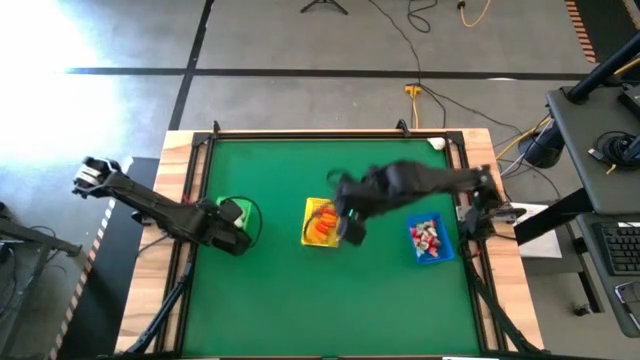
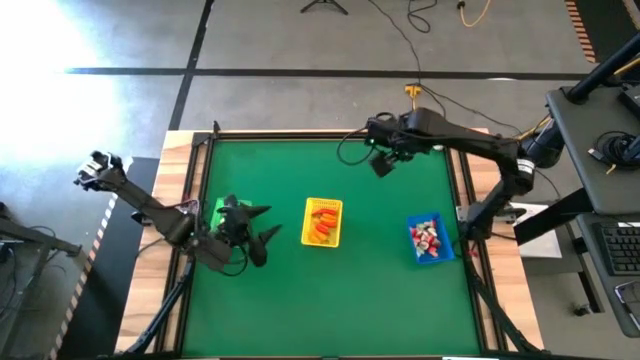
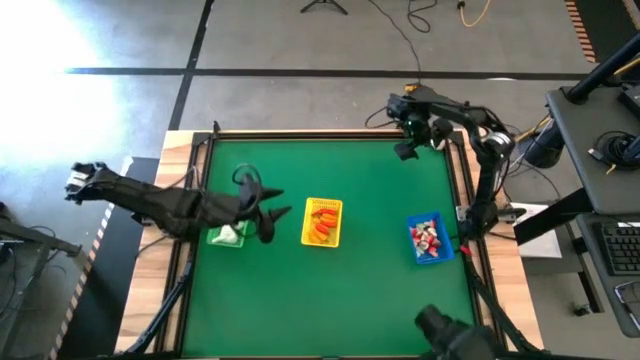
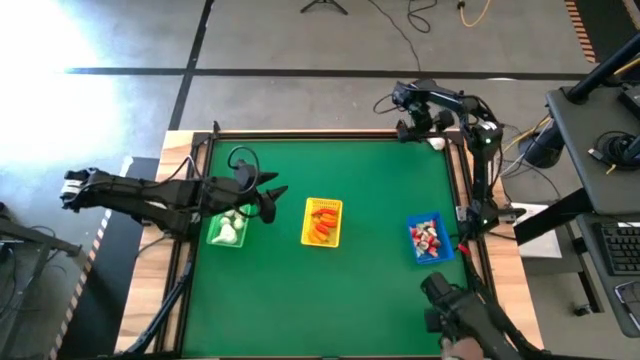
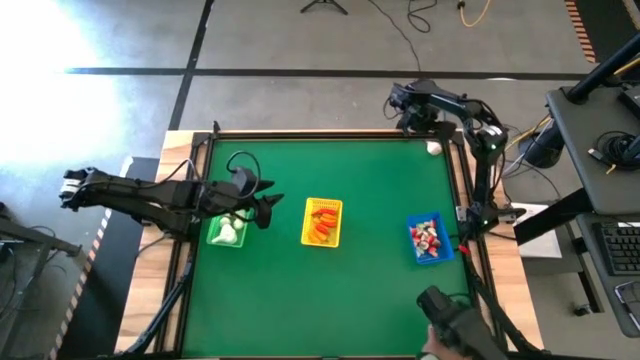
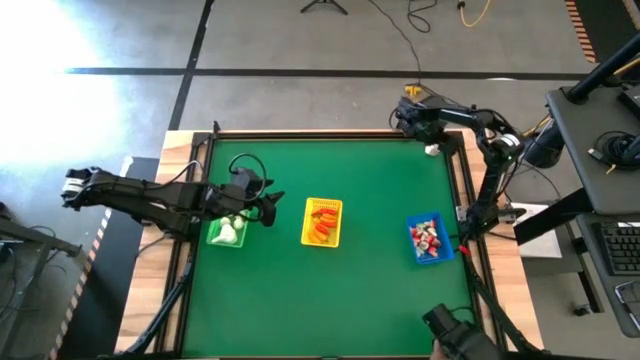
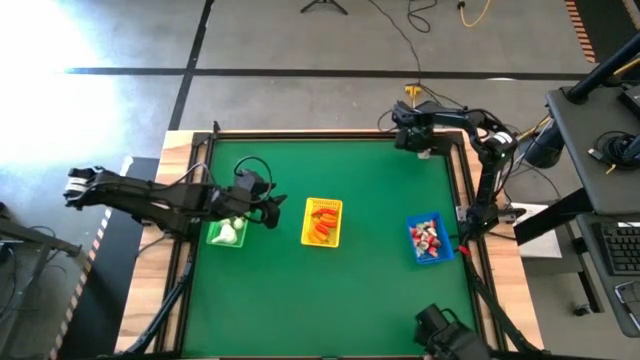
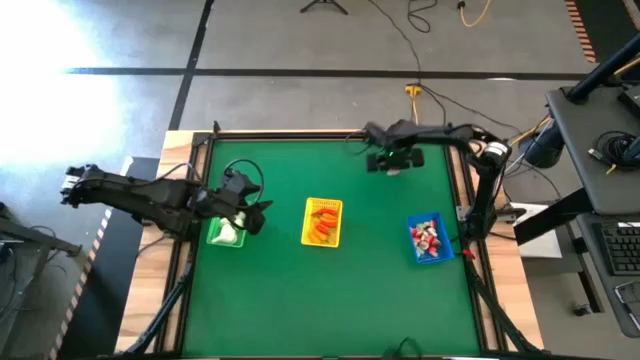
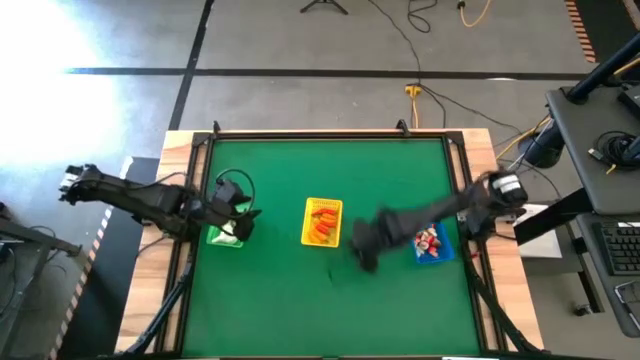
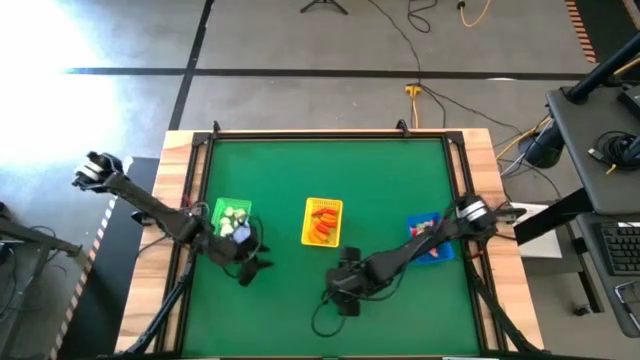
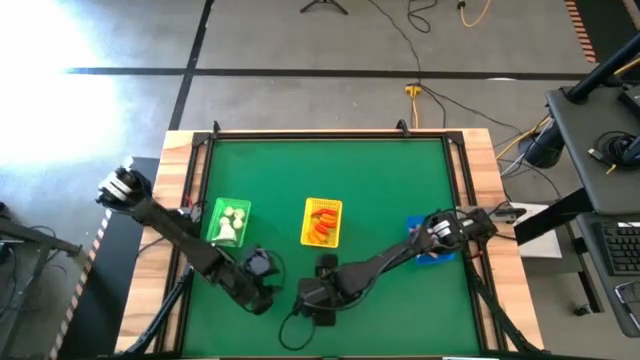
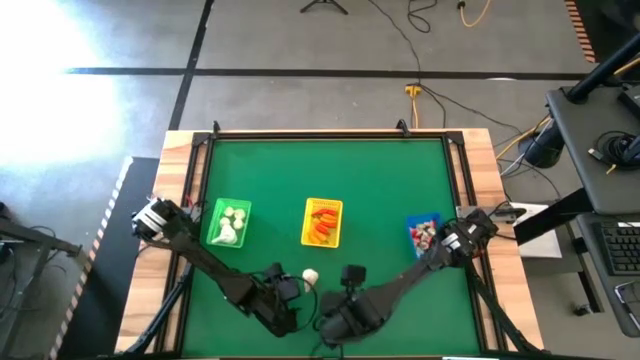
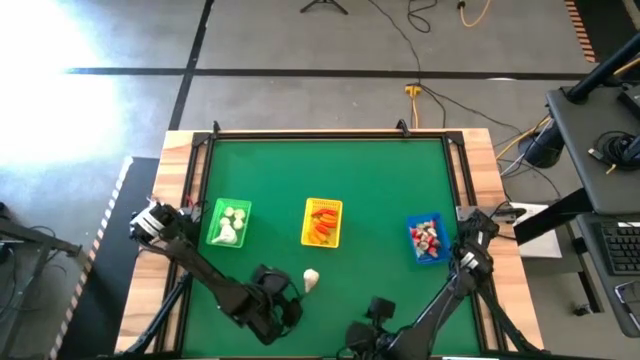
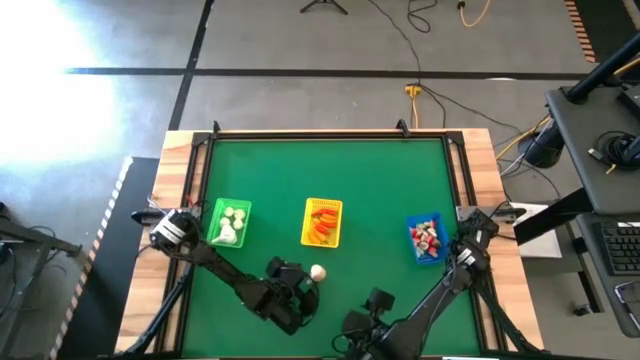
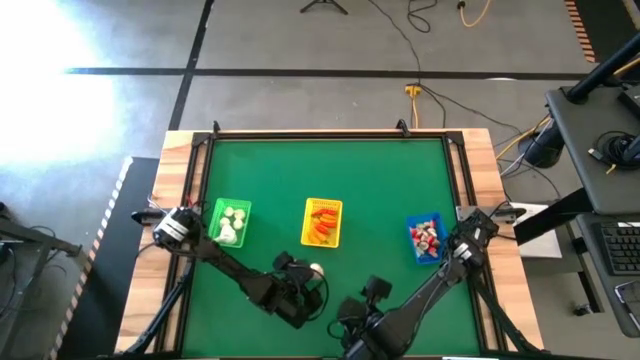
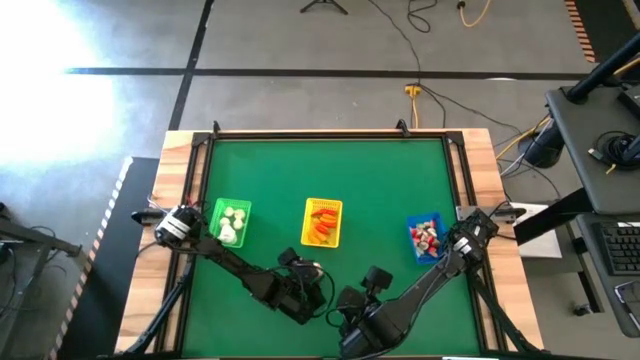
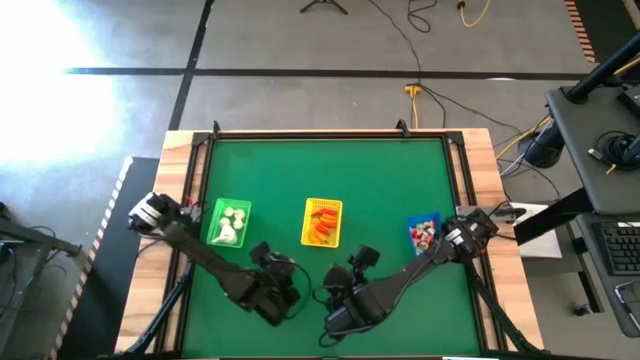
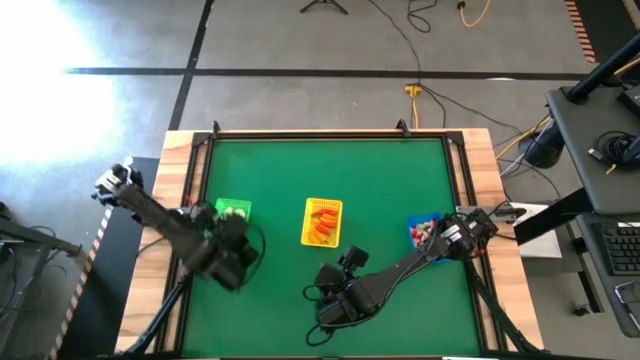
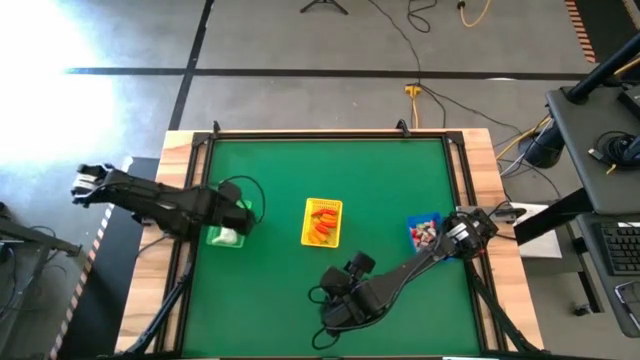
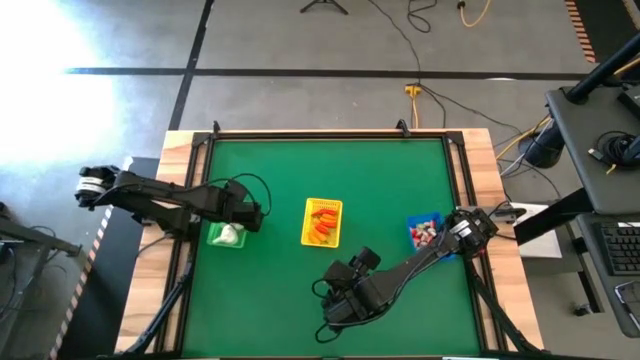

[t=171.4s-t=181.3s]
Task: Sort produce into baskets
Put the white garlic into the green bin

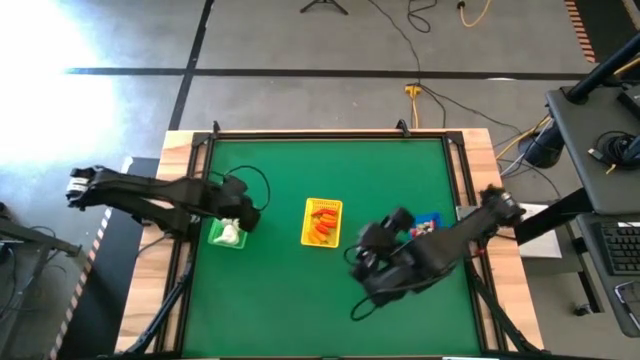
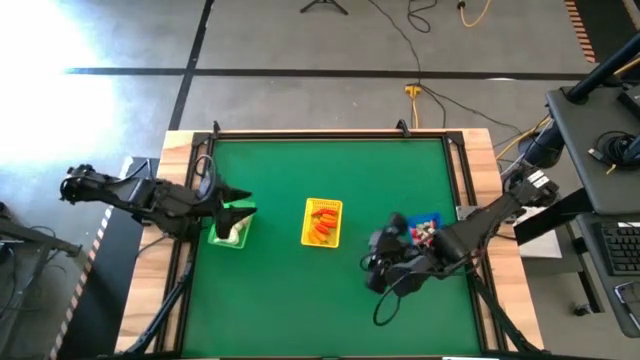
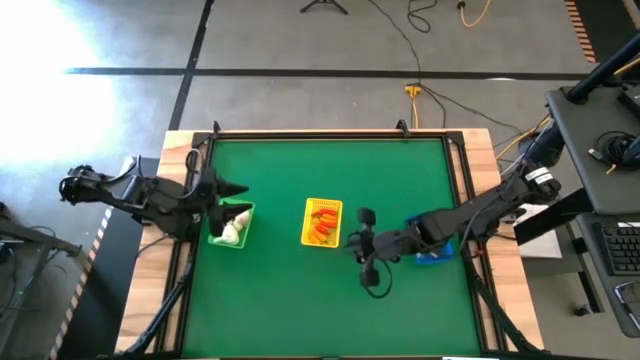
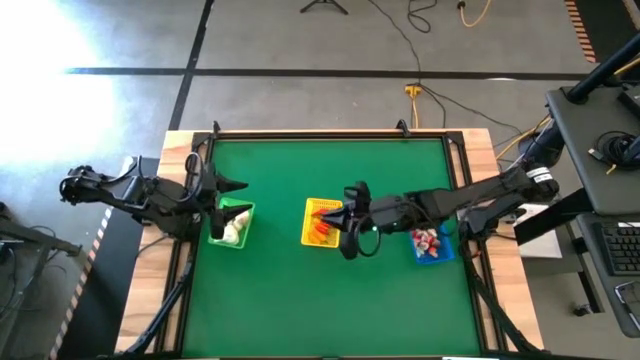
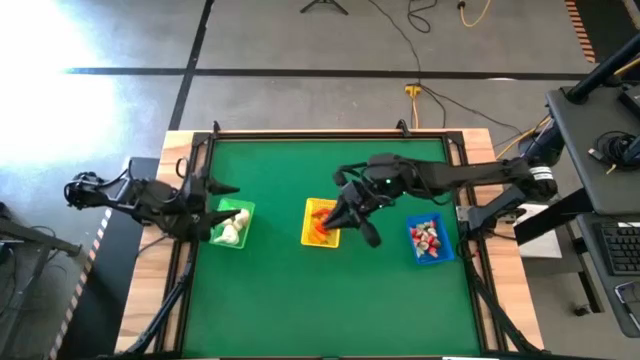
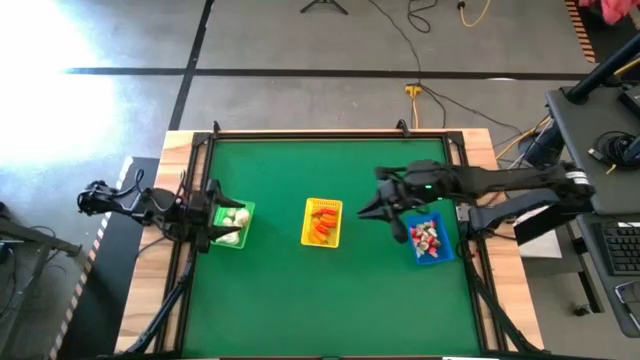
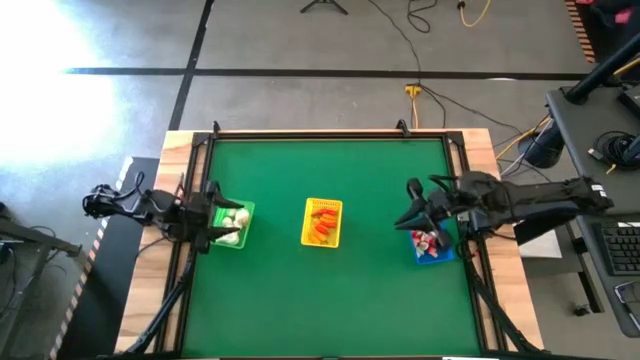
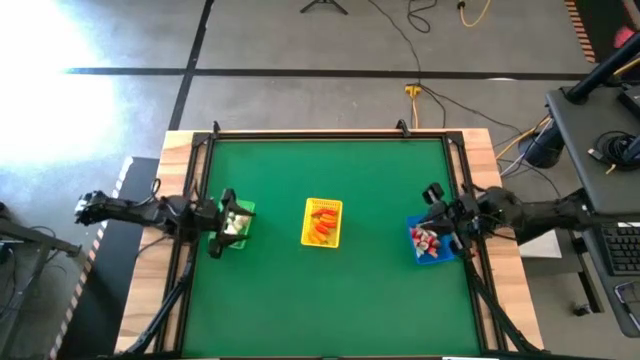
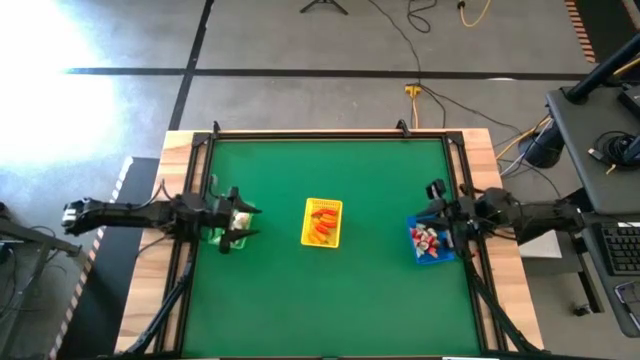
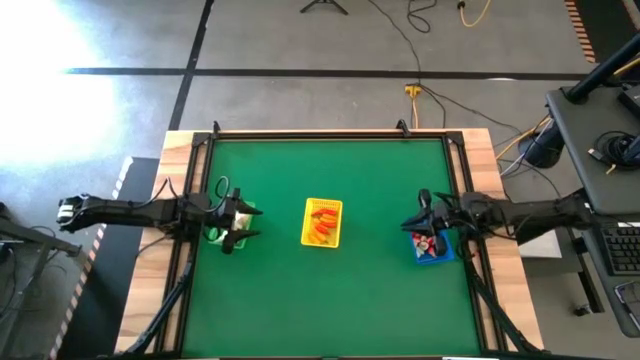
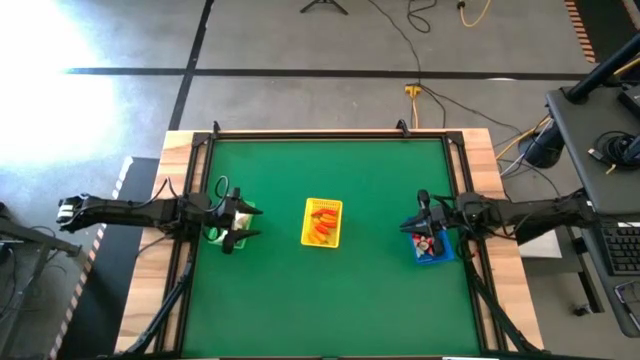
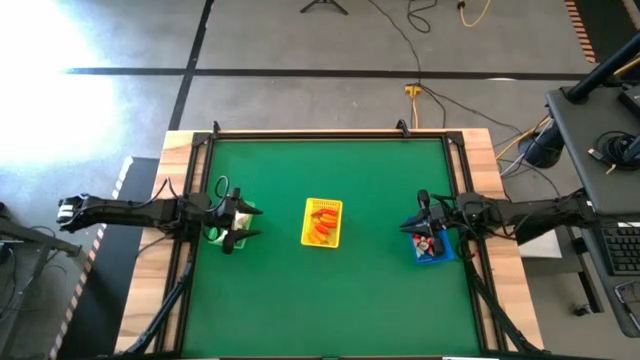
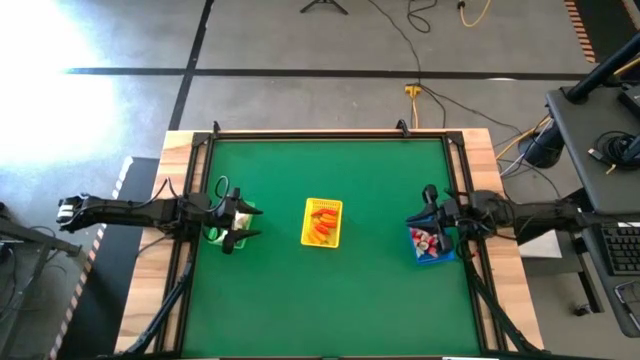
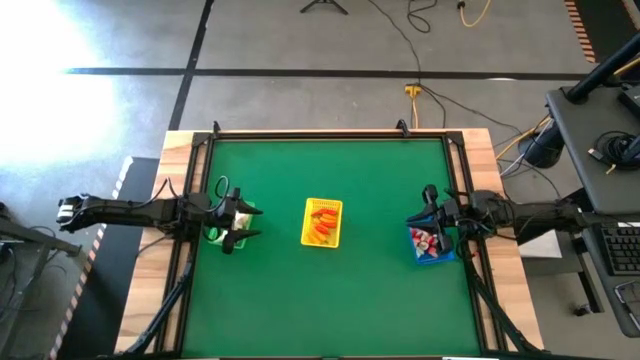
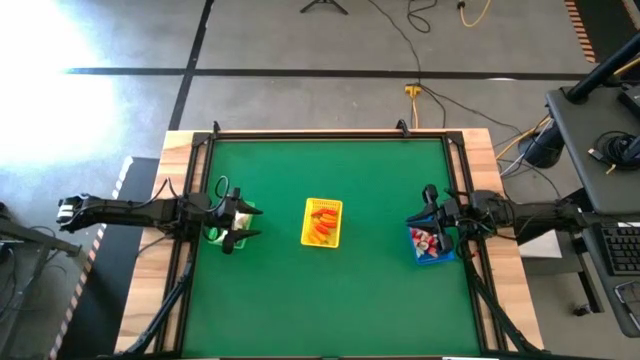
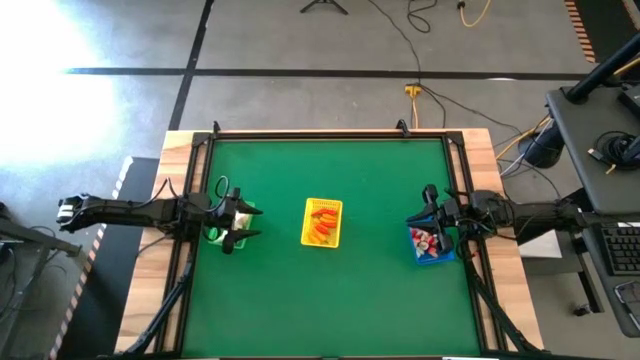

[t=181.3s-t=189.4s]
Return to Home Position

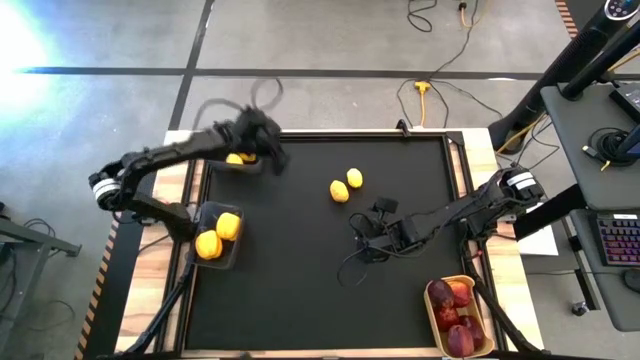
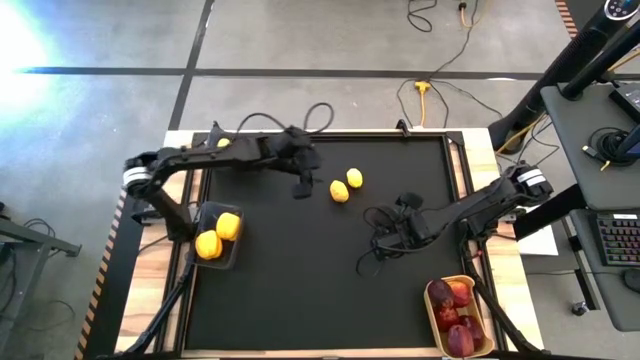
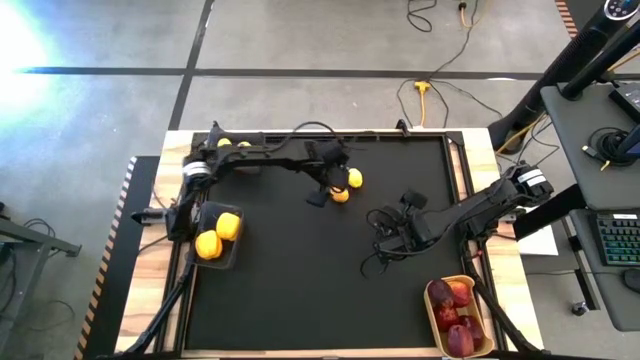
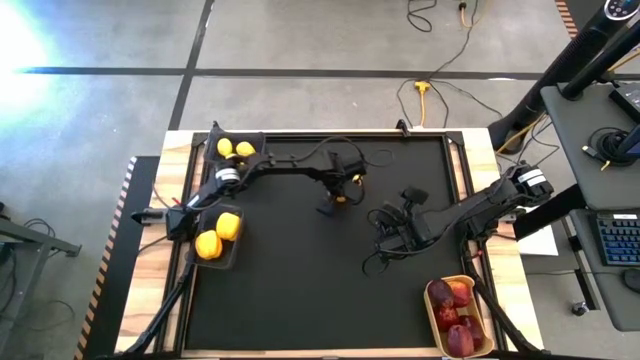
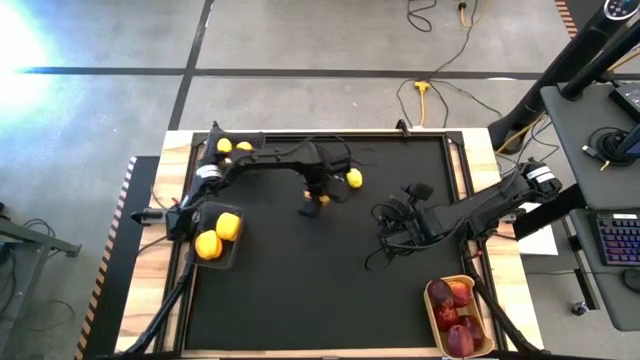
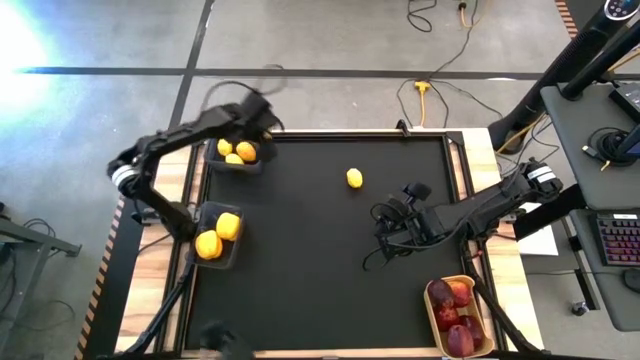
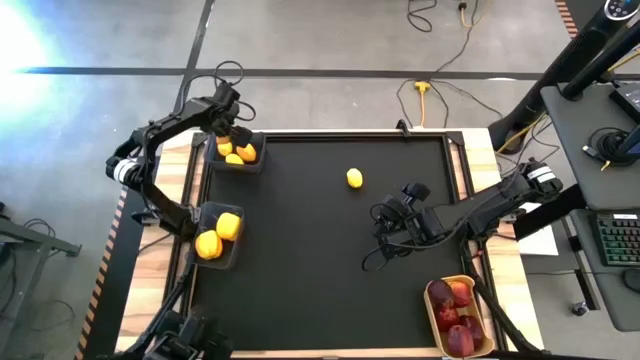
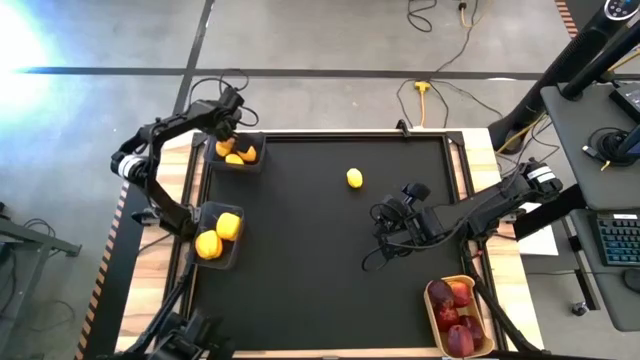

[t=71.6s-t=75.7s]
Task: Sort produce into baskets
Put the lemon into the top black bin
